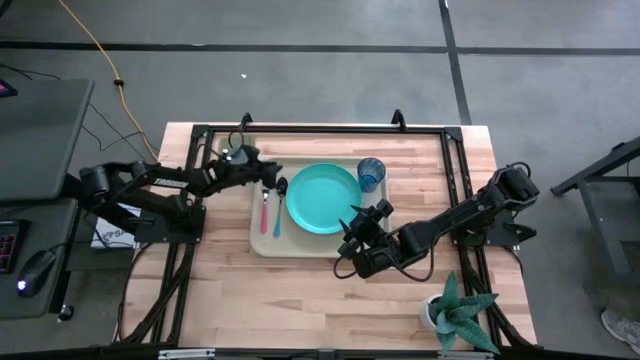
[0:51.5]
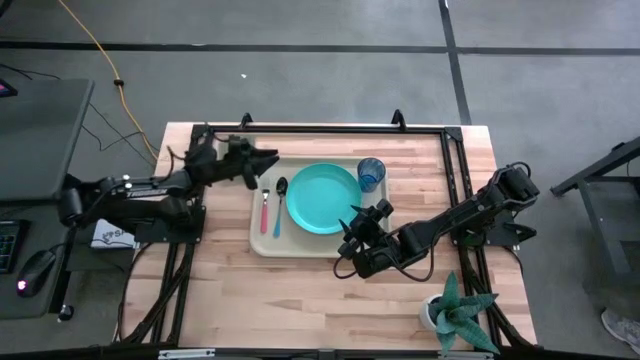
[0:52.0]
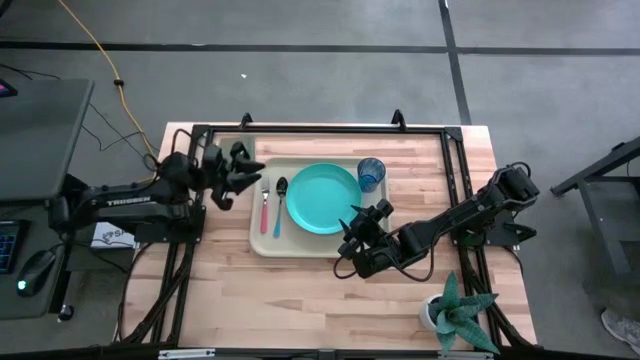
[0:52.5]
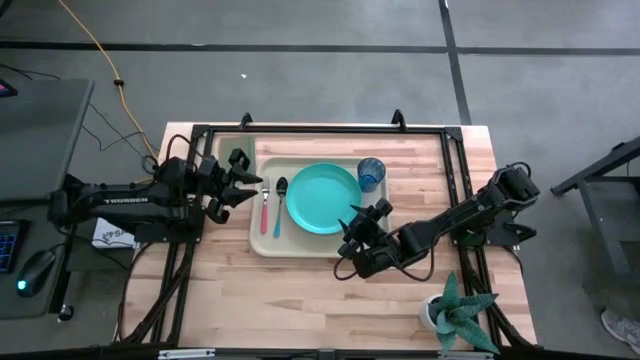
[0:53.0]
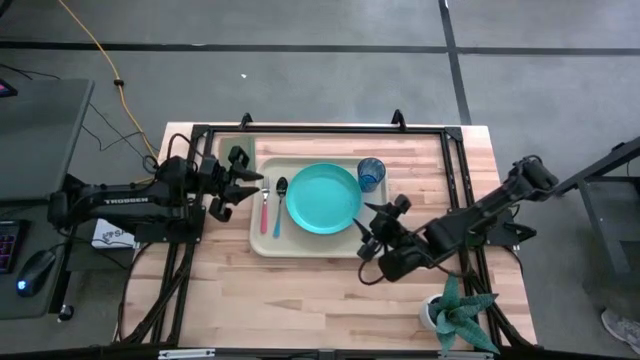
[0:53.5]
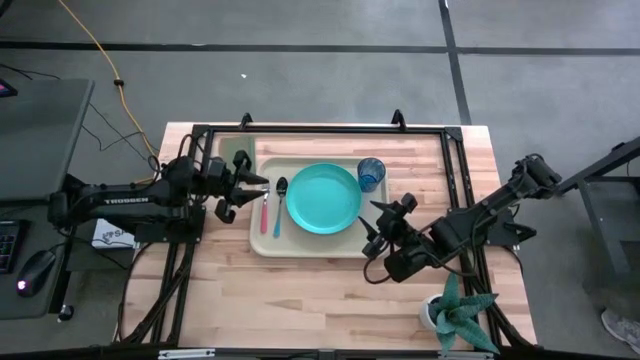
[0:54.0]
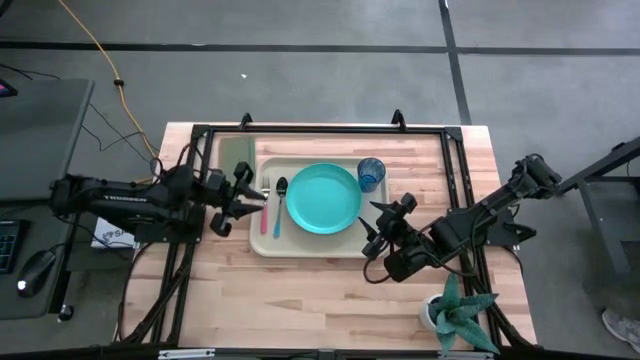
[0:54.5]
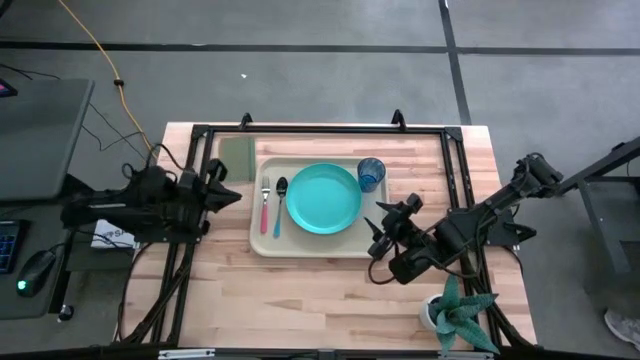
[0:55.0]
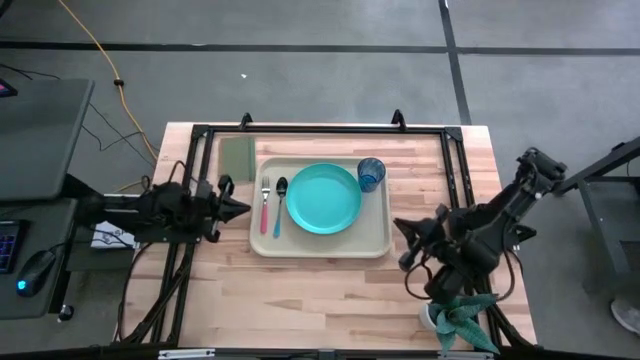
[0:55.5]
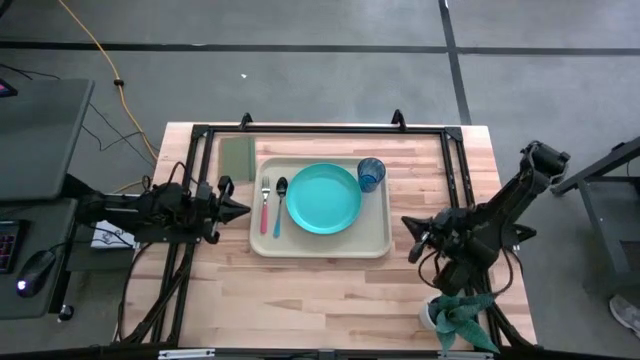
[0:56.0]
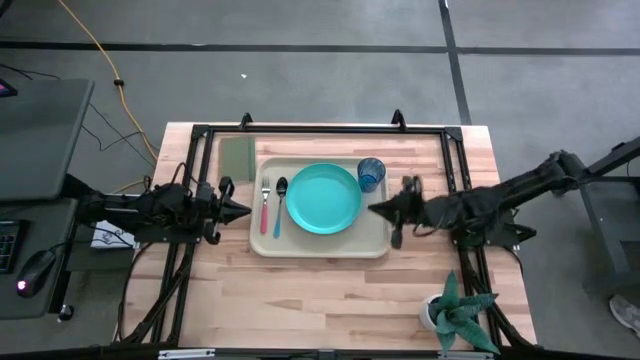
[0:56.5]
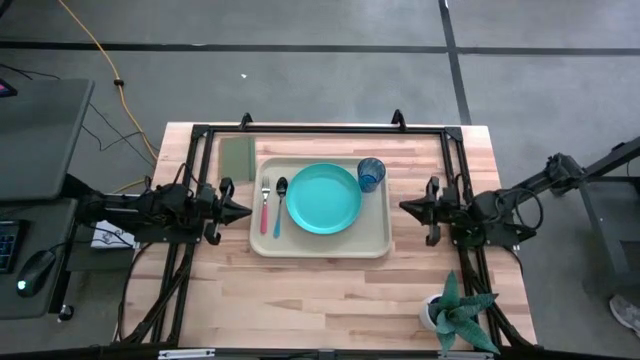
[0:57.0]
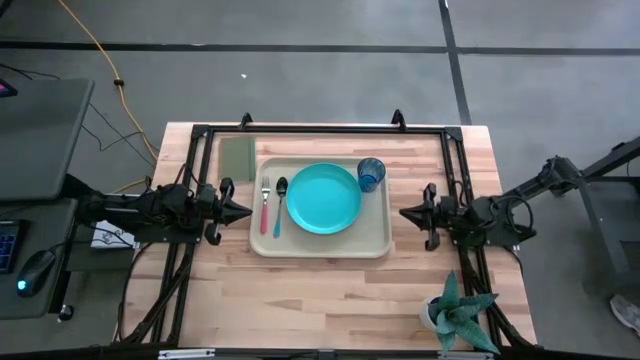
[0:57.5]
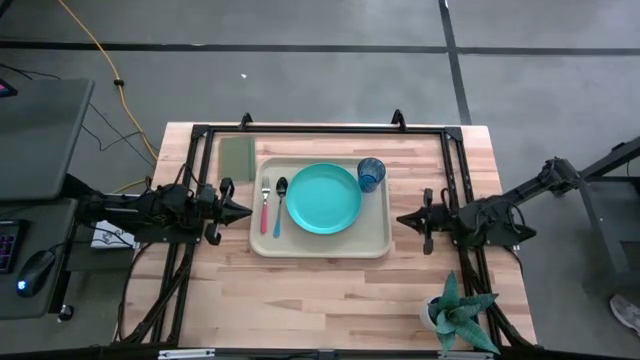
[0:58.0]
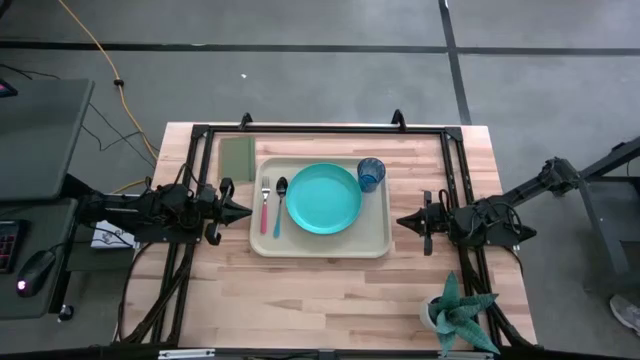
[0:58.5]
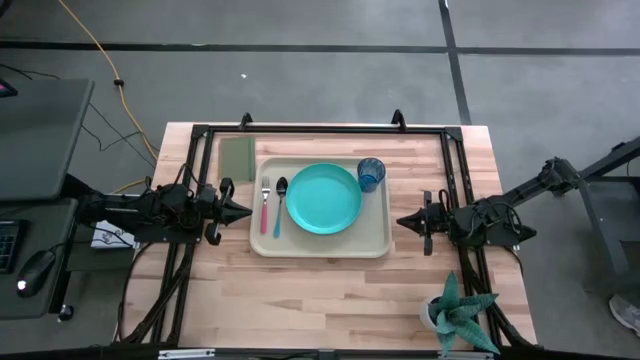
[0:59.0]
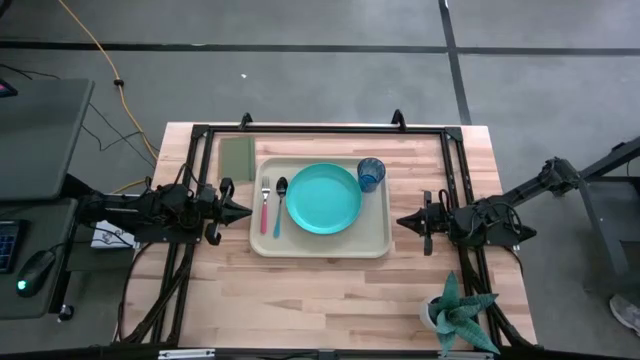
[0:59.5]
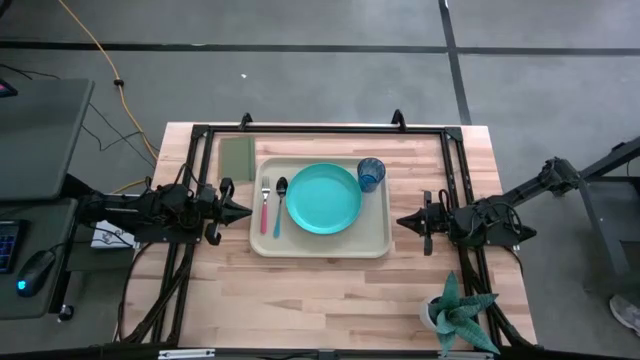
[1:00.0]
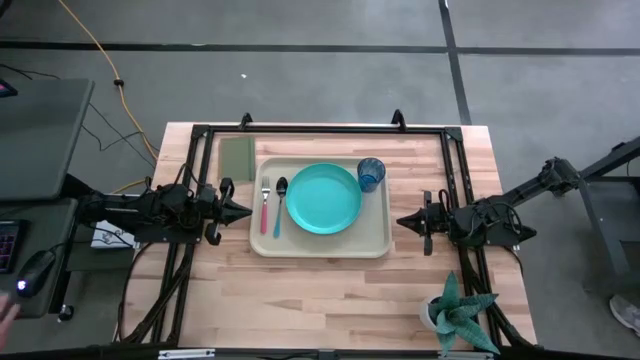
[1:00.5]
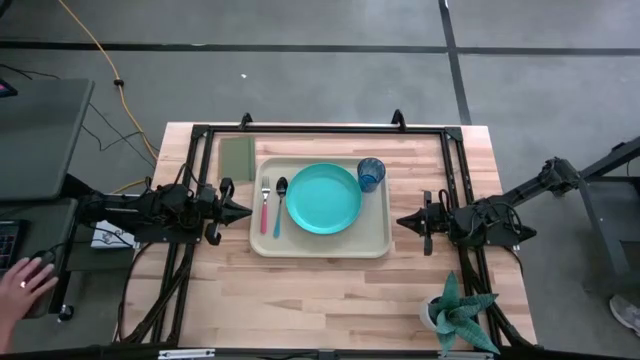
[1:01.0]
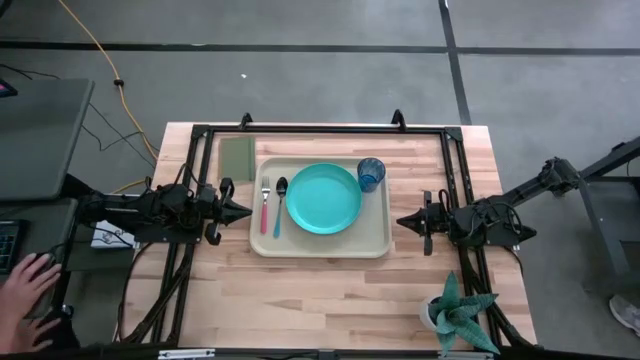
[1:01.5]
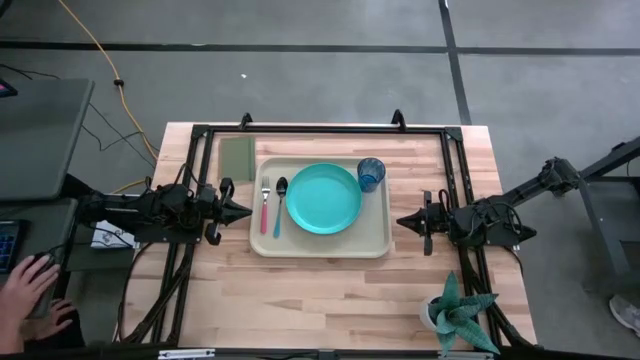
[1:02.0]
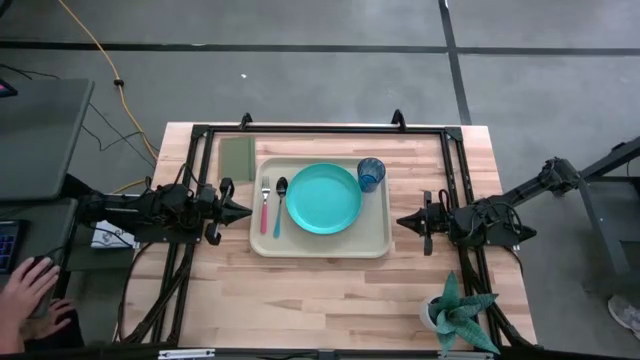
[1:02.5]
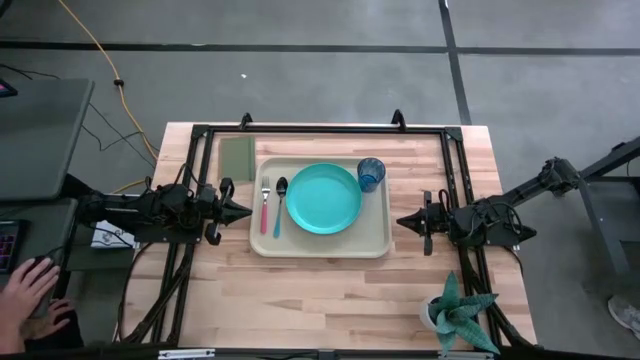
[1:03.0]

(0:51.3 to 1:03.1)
Task: Pick and place plate/cup/fork/spoon on tray
Return to Home Position

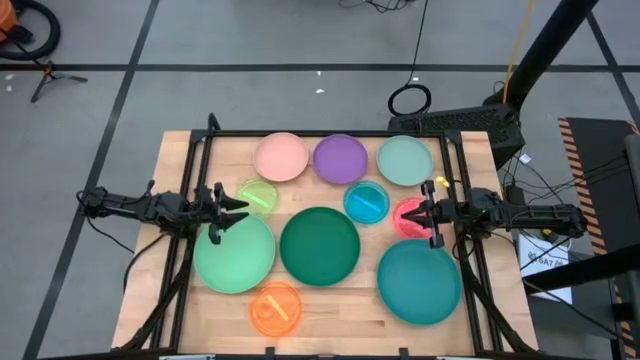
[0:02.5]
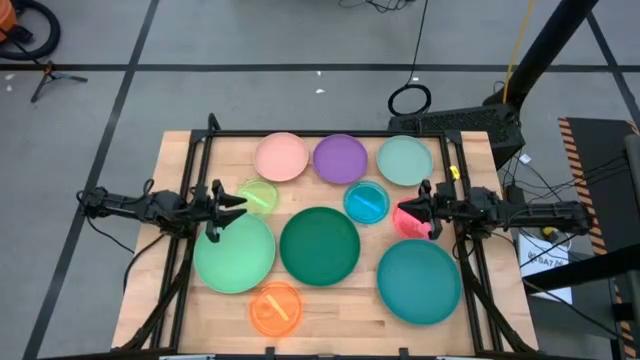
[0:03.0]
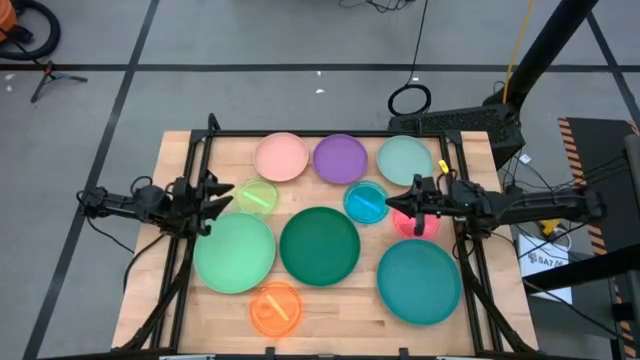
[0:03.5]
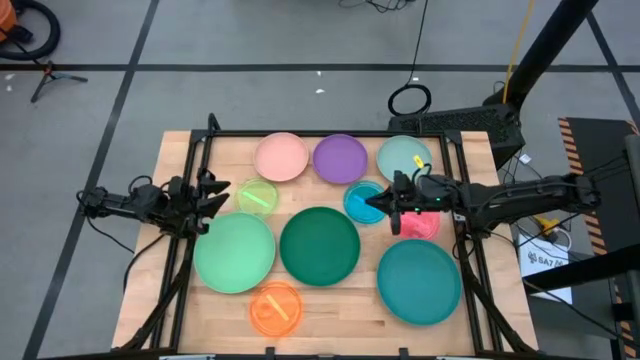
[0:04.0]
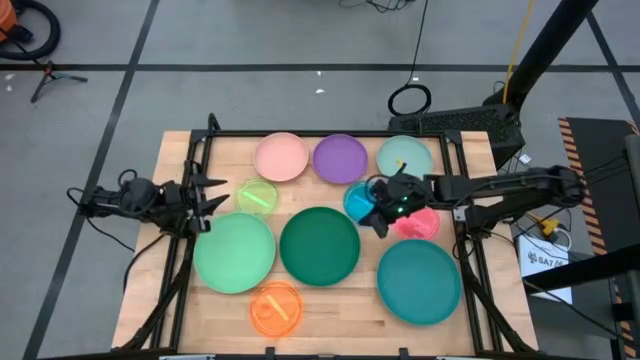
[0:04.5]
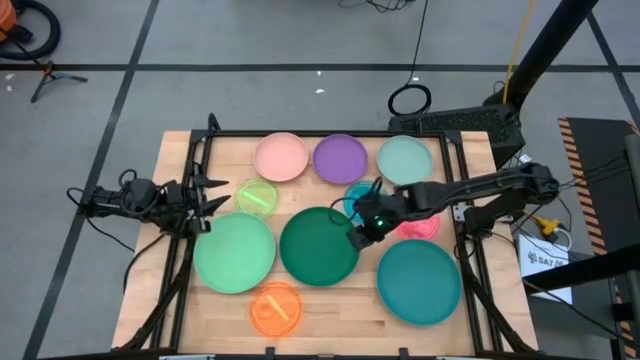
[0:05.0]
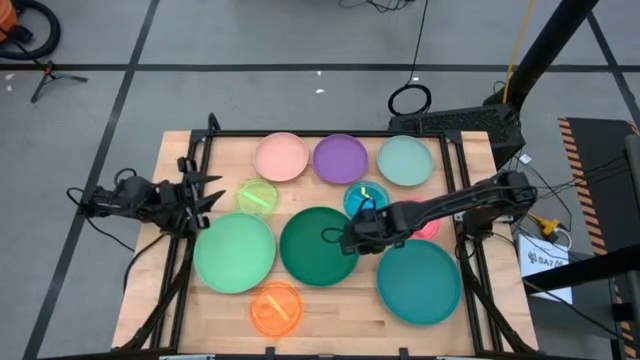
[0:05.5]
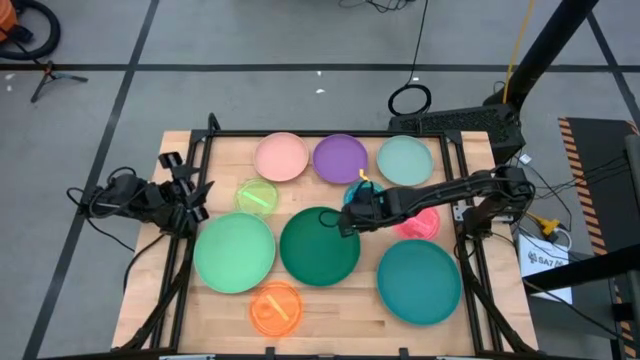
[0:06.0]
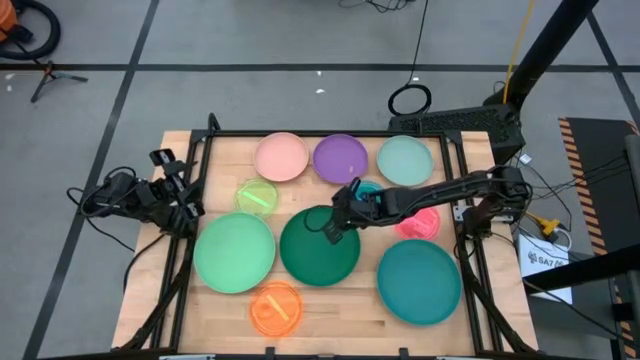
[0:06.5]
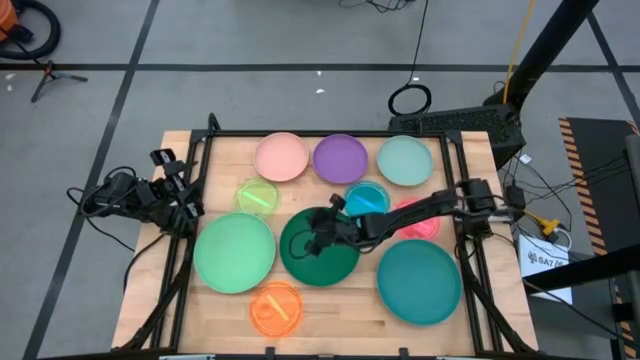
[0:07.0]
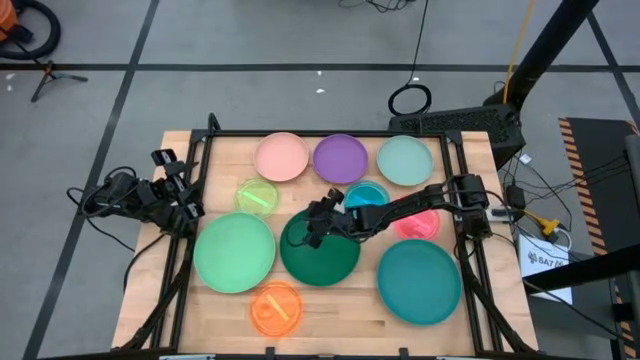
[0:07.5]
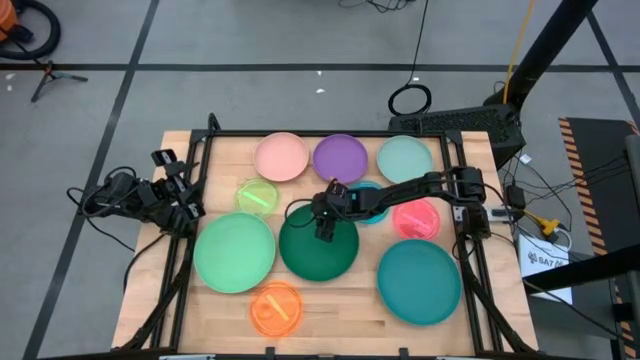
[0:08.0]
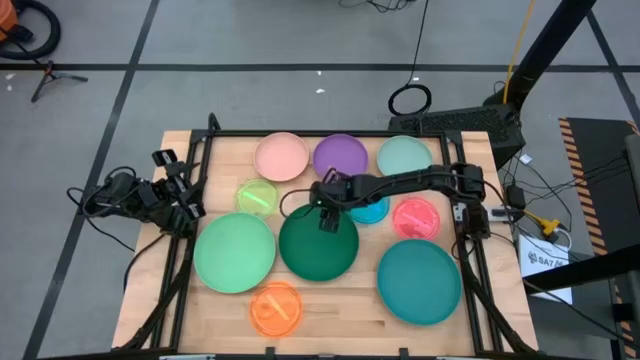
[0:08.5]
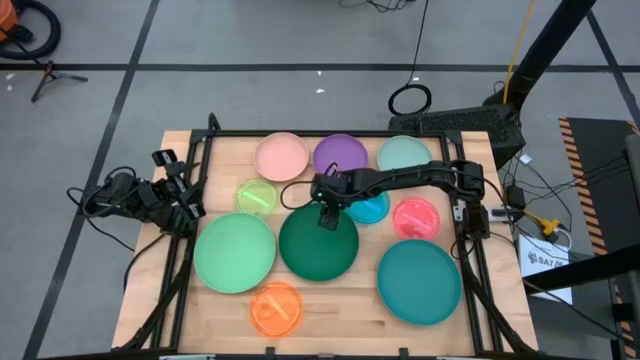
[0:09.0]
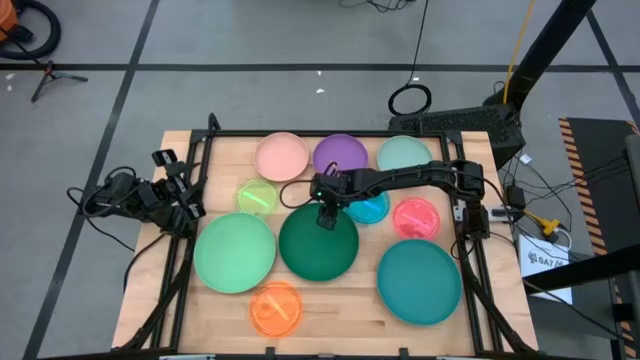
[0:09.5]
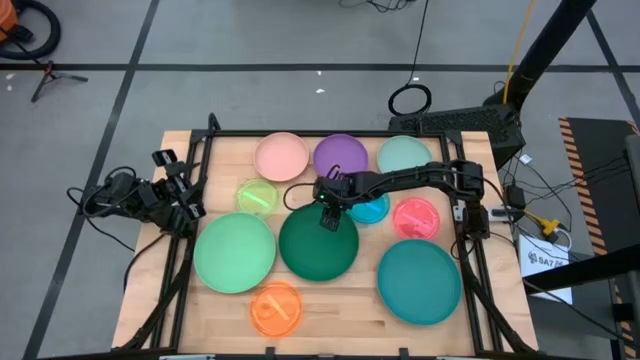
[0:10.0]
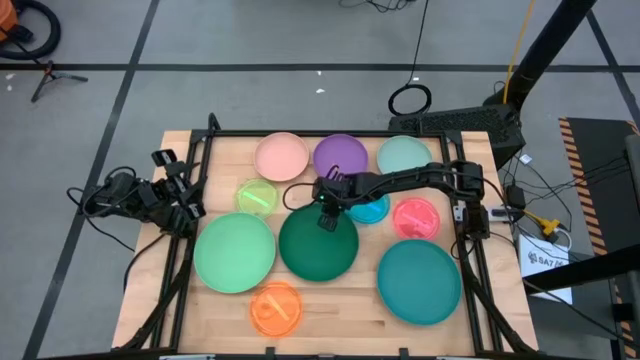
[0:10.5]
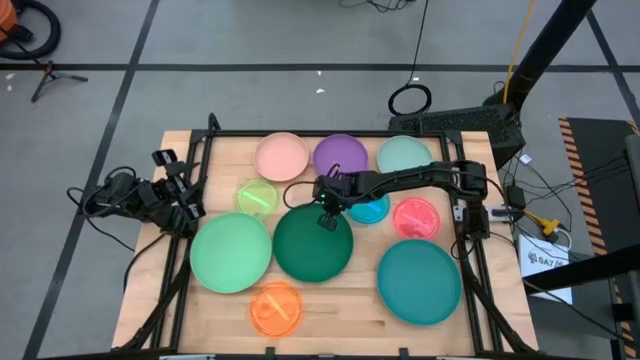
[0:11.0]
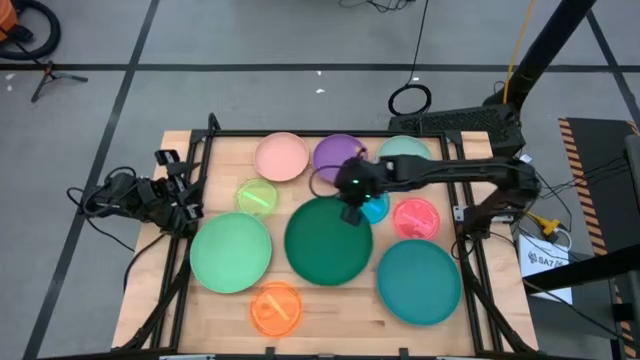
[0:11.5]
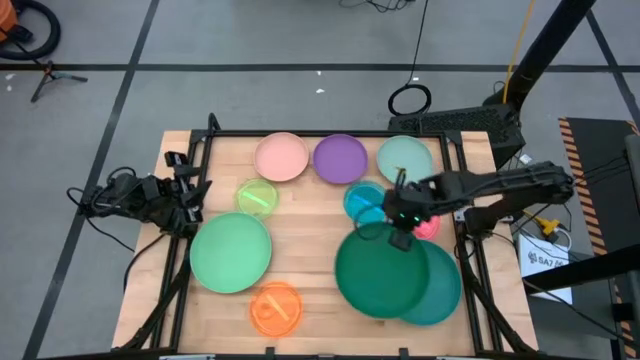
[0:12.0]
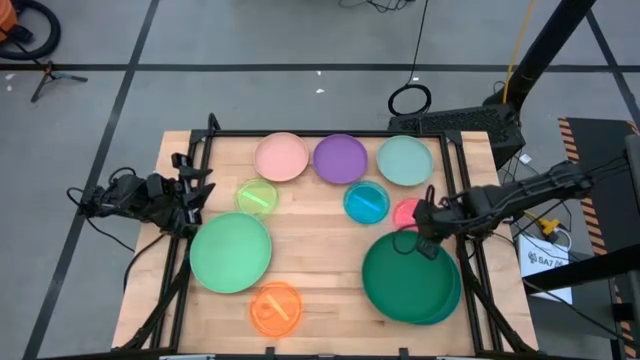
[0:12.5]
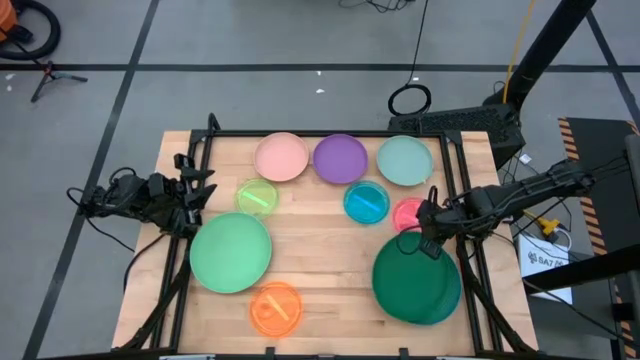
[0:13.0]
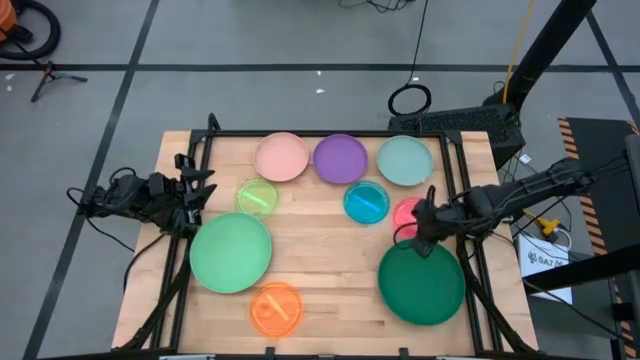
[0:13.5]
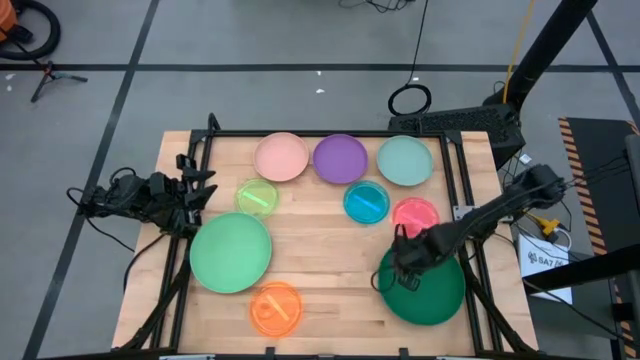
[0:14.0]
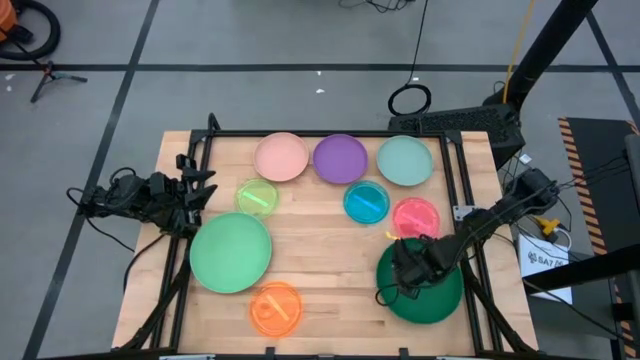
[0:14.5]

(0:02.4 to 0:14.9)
Task: Stack plastic plates
Stack the green plate on top of the blue plate
